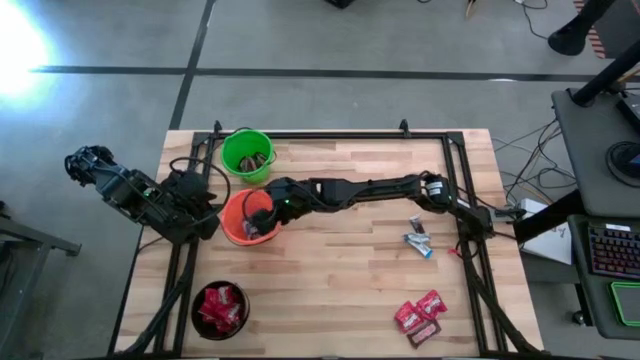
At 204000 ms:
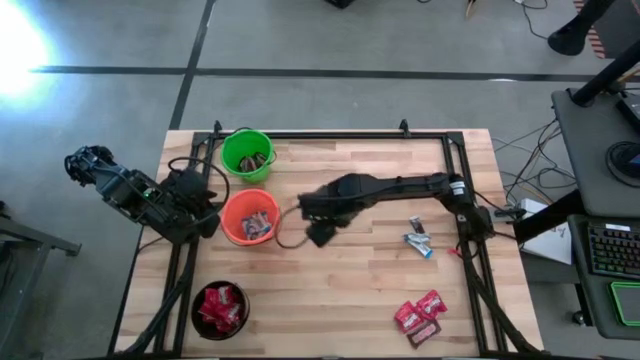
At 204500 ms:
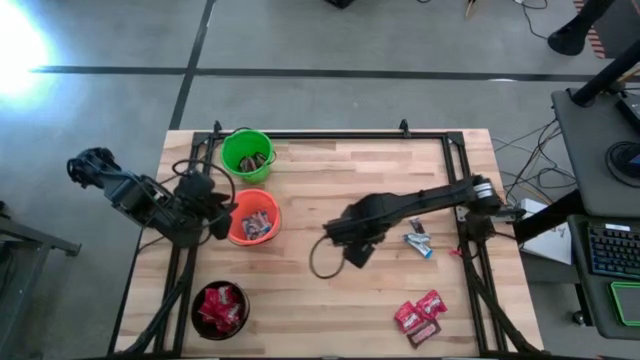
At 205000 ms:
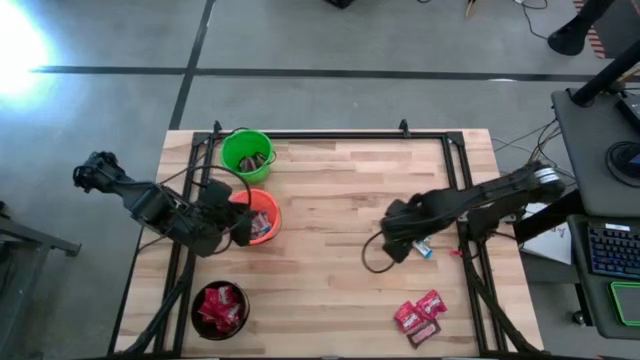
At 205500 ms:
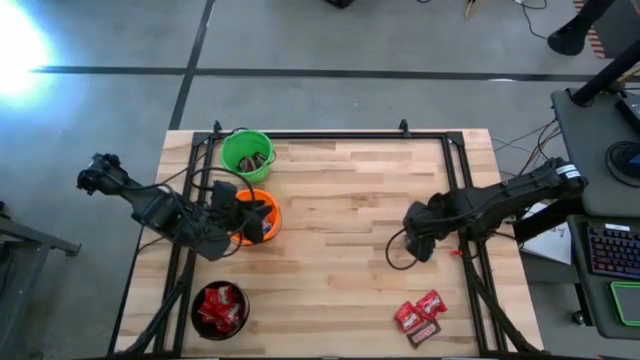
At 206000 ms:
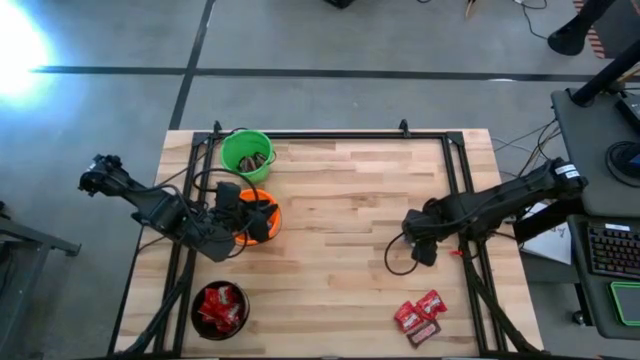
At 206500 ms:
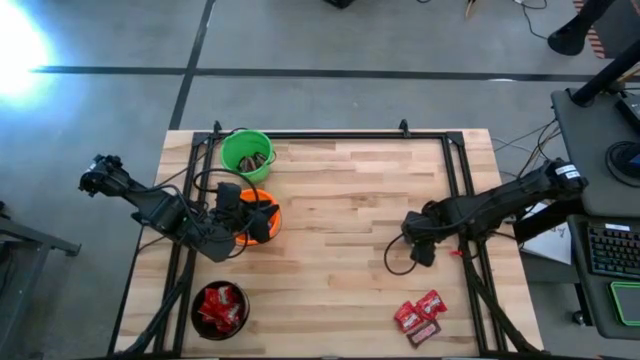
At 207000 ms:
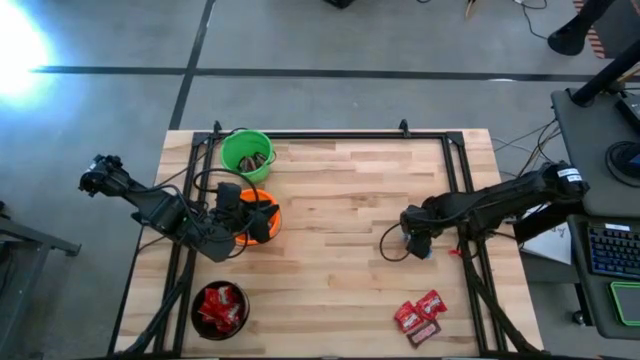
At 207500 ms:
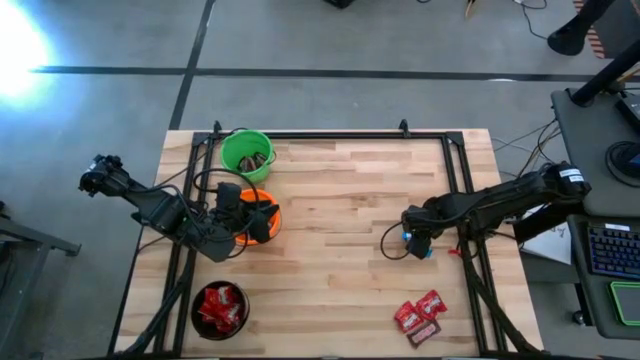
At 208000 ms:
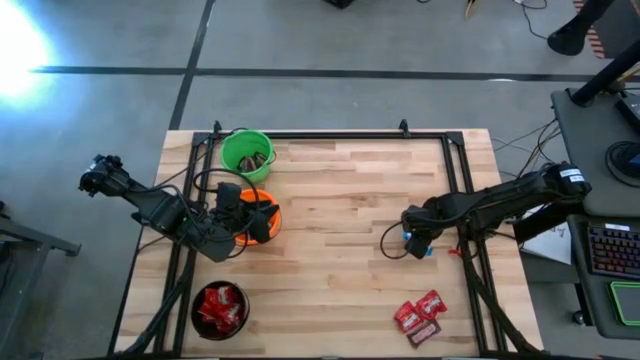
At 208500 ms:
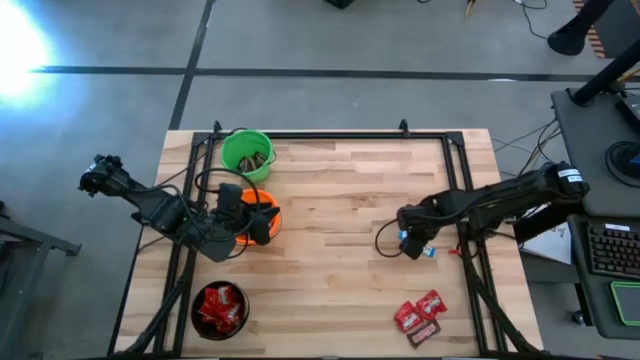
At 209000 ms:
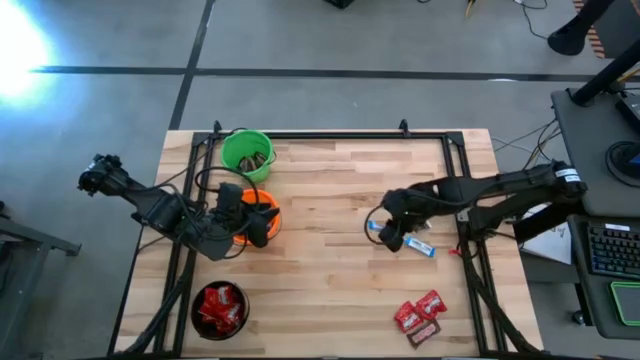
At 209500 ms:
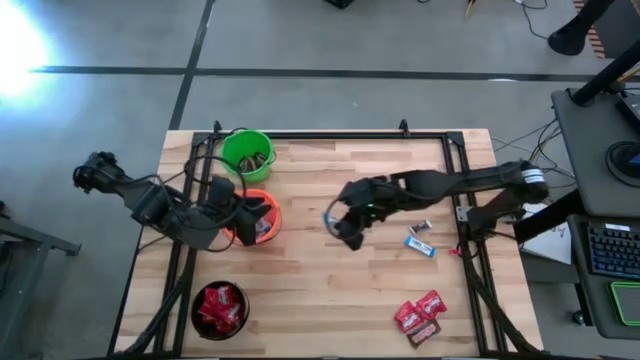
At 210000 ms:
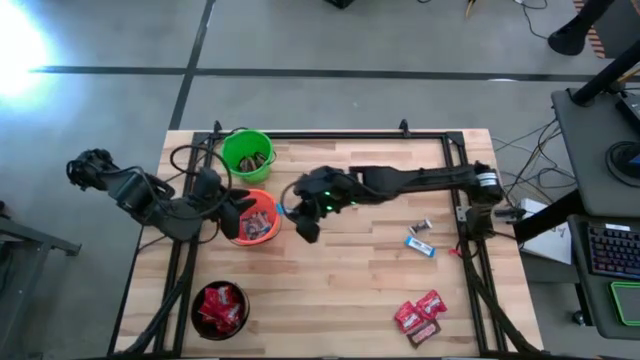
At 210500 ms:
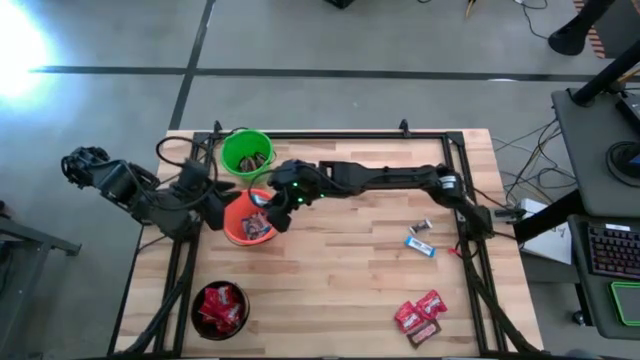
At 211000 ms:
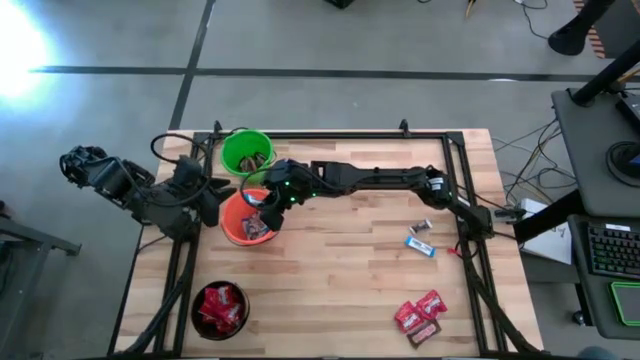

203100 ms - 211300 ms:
Task: Organize candy in baskets
Put the white chocolate into the orange bucket

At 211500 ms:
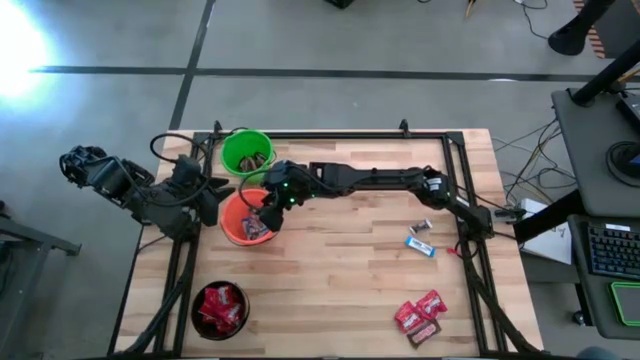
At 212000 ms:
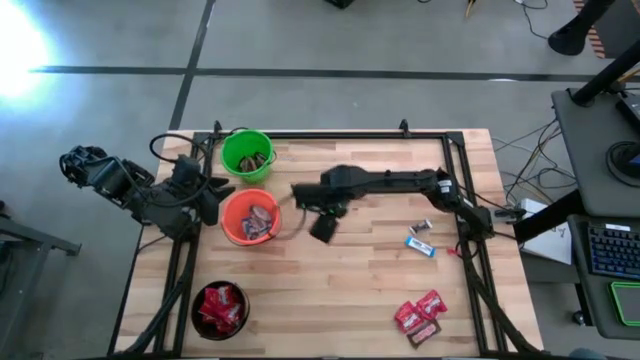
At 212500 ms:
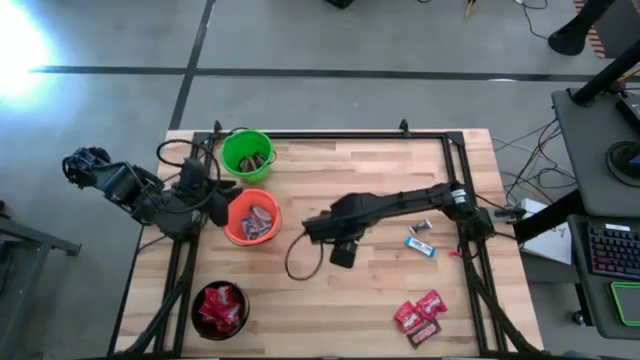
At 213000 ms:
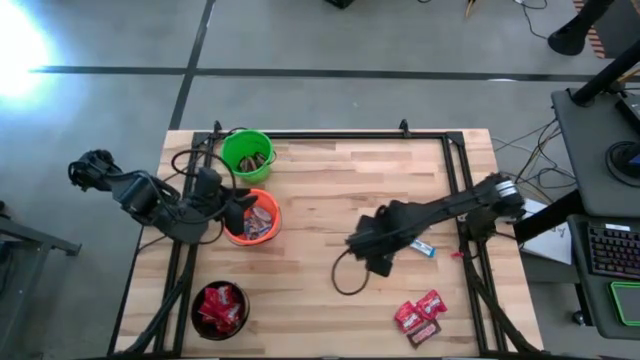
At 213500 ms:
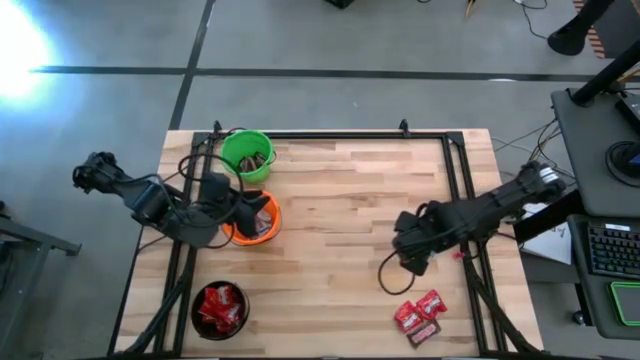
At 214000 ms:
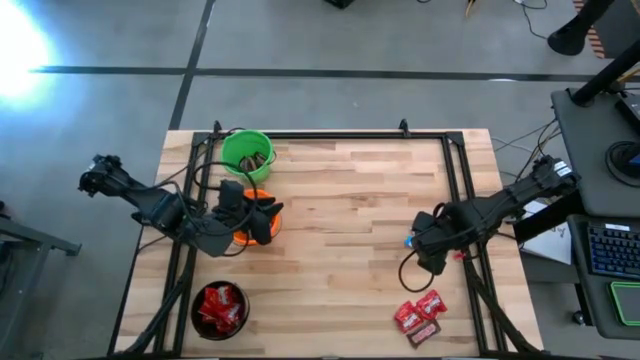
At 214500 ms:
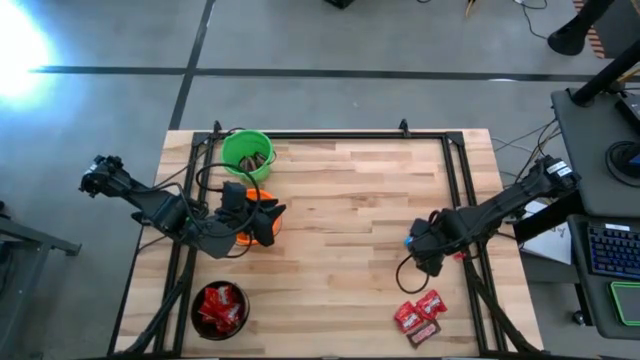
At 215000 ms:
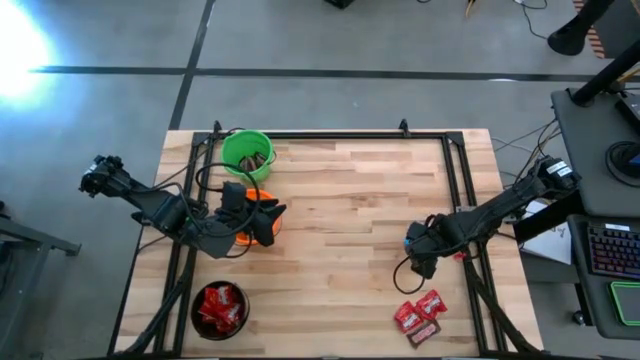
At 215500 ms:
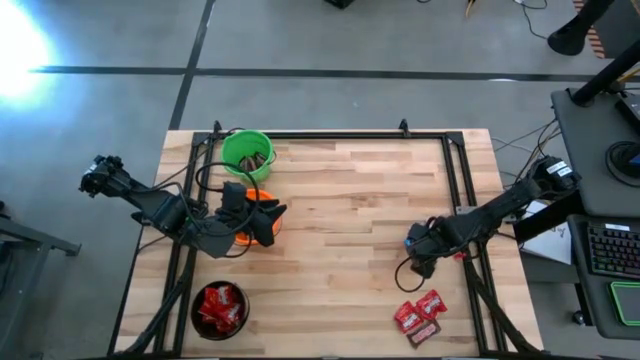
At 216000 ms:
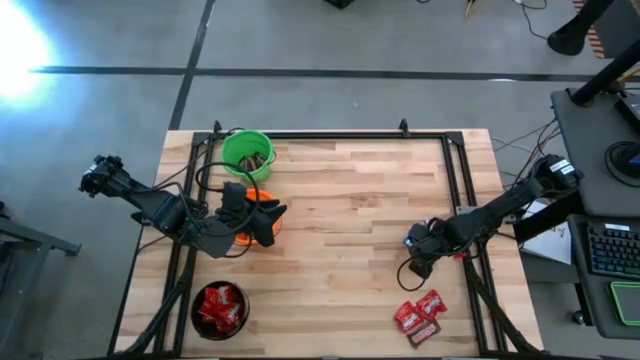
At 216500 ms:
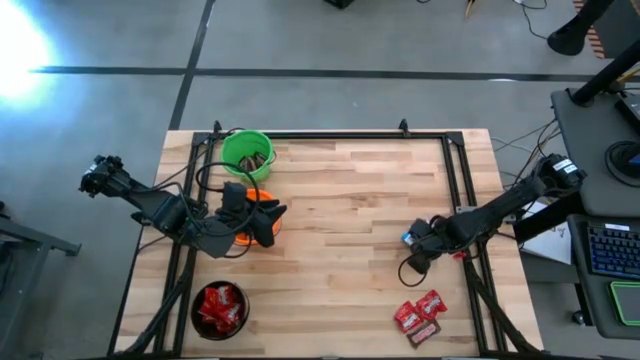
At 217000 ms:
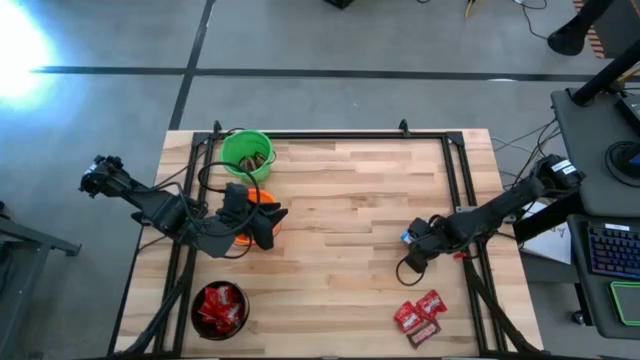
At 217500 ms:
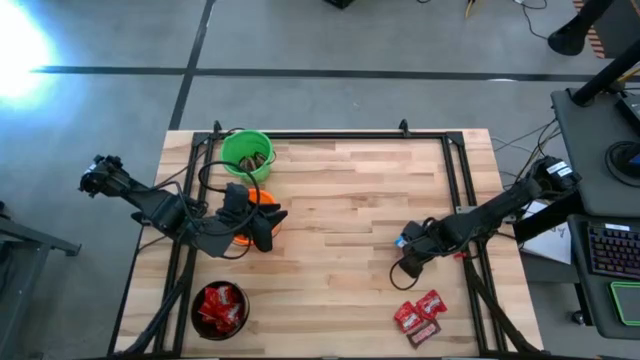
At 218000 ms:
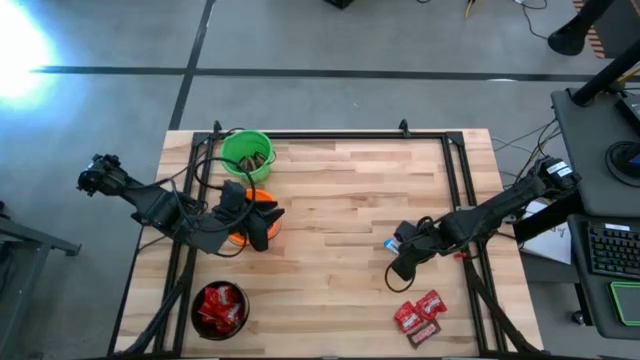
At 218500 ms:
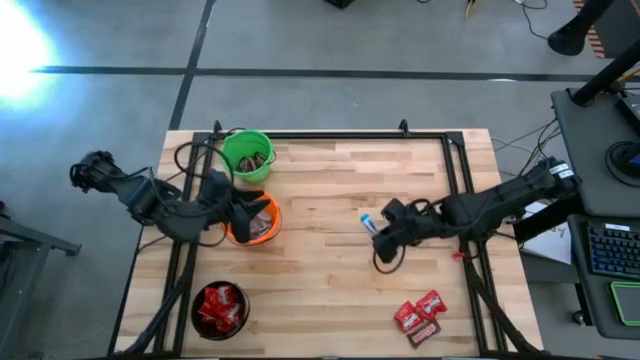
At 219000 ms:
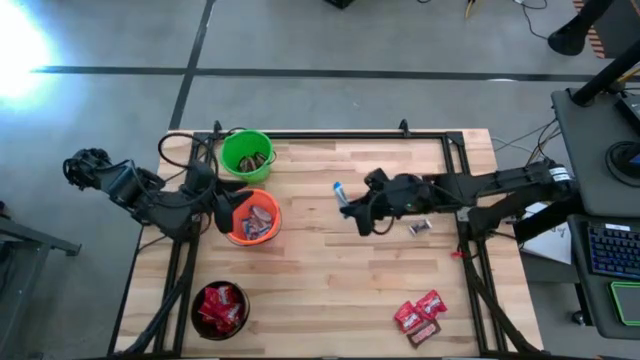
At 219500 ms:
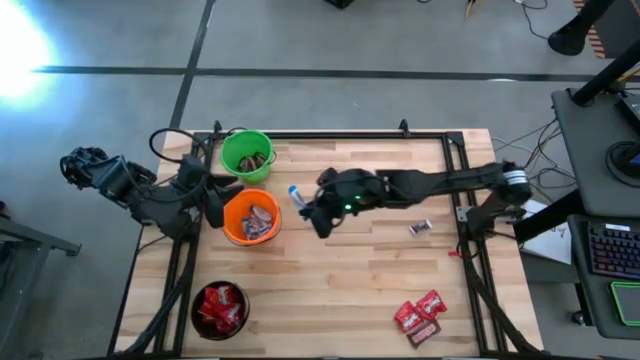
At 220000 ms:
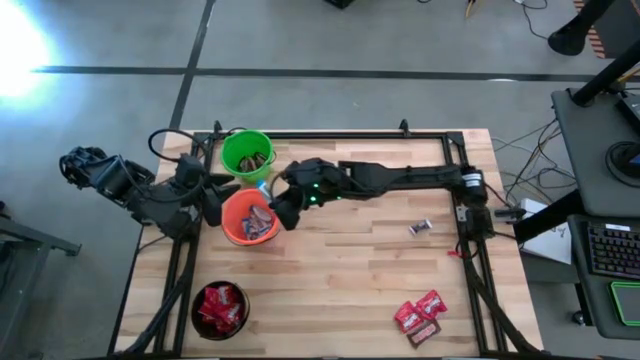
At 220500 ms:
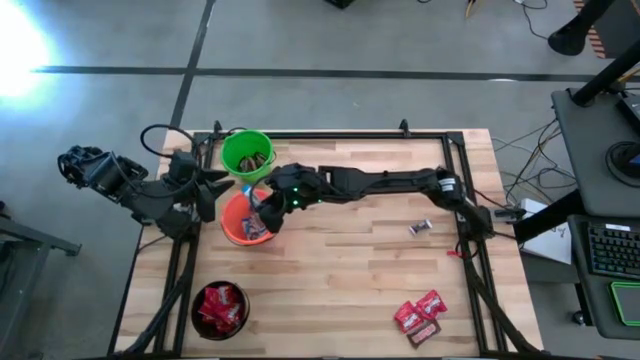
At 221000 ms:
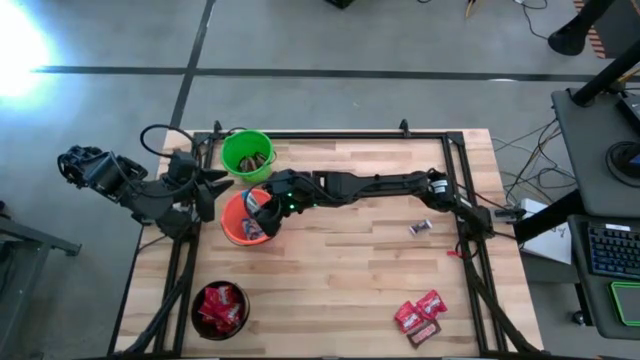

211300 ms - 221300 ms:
Put the white chocolate into the orange bucket

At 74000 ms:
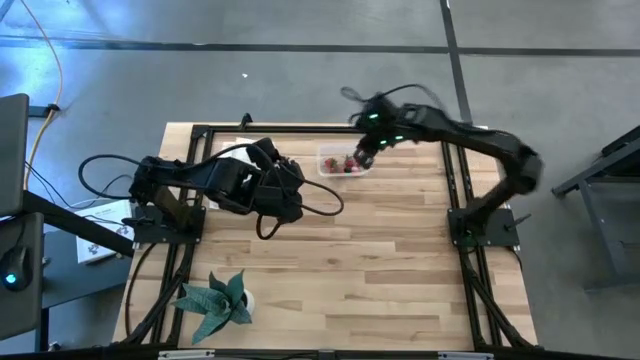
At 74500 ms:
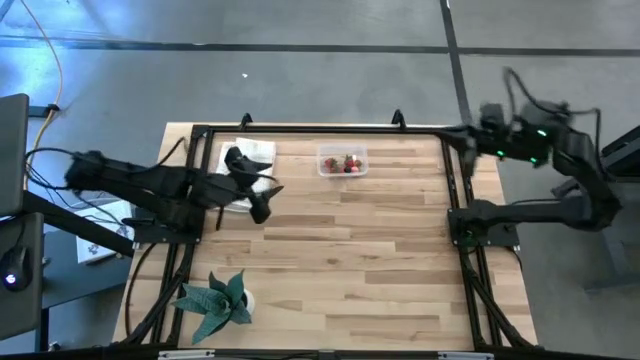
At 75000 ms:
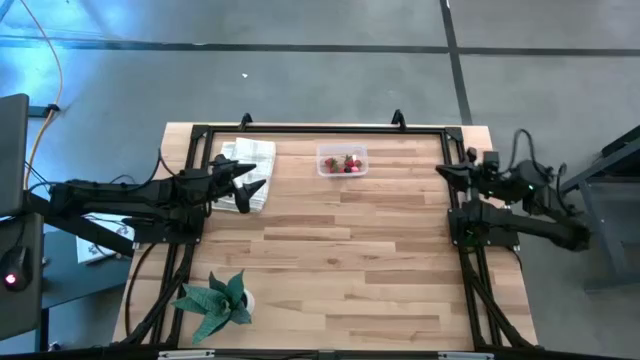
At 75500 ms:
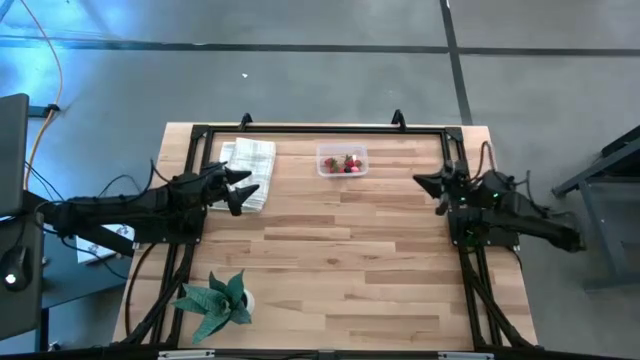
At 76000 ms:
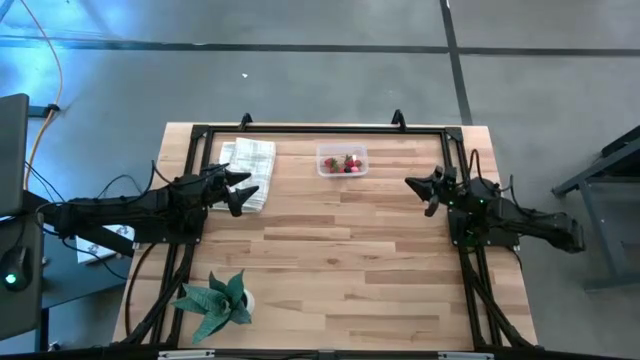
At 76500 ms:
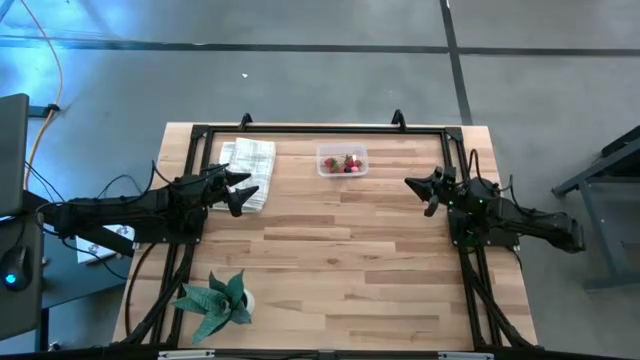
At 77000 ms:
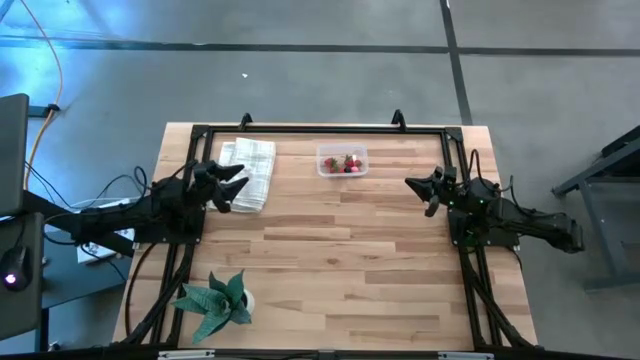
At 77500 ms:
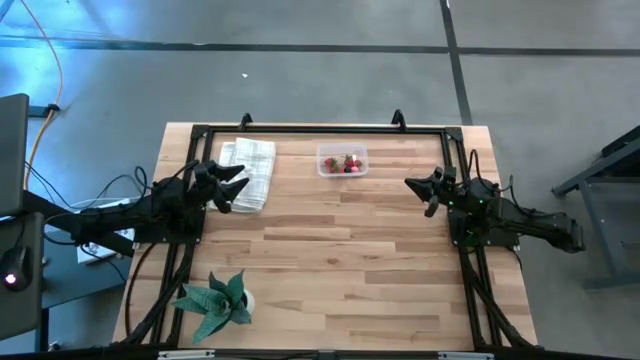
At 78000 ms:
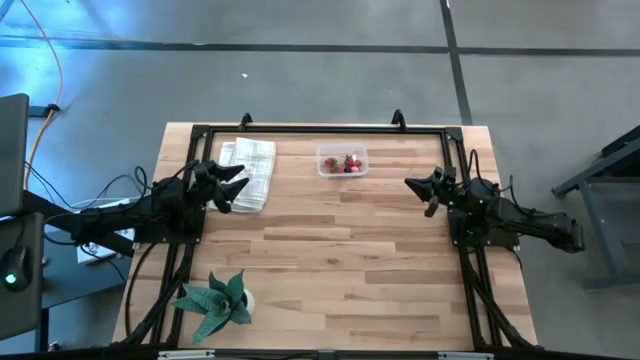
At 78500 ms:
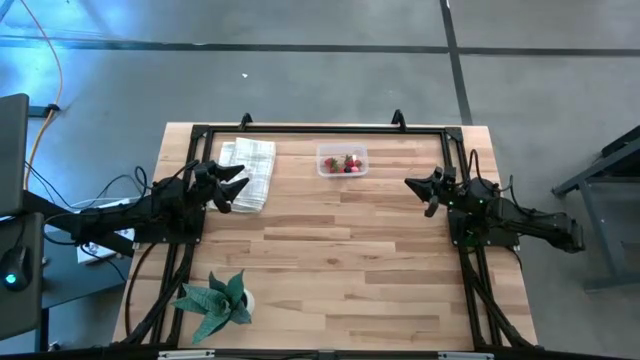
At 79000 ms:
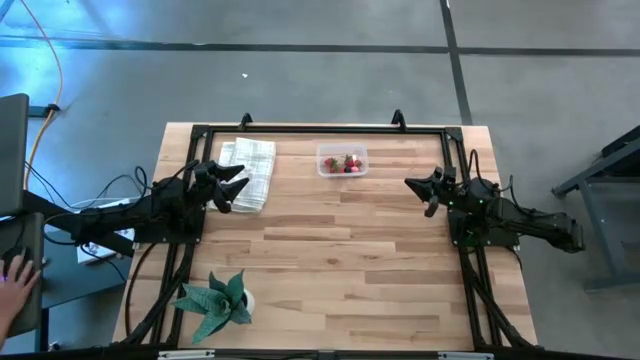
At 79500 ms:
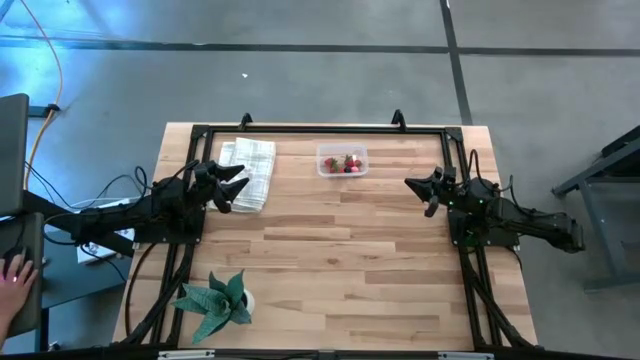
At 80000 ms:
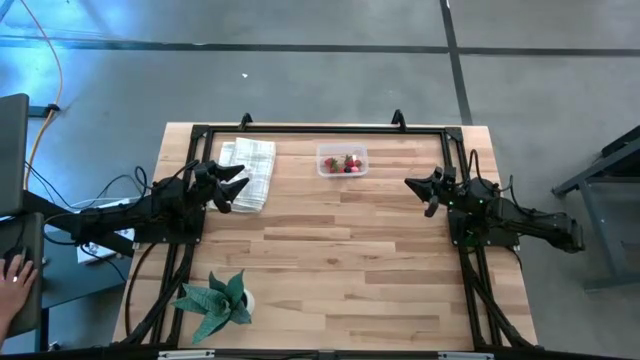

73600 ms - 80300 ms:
Task: Pick and placing Produce into tupperware
Return to Home Position
